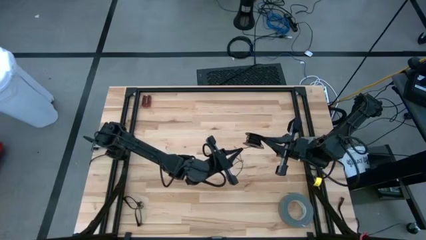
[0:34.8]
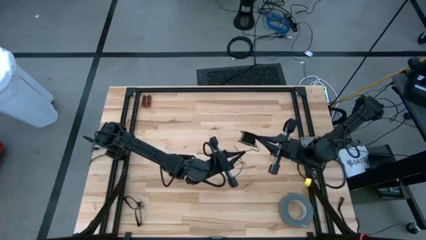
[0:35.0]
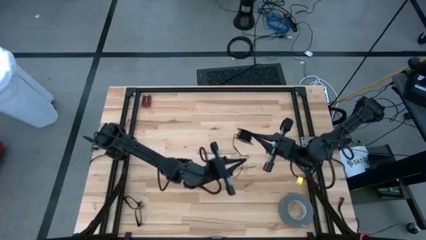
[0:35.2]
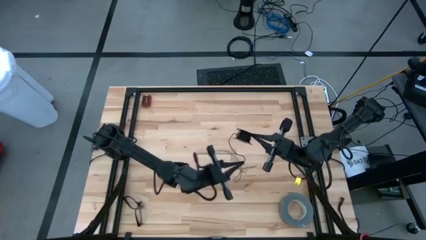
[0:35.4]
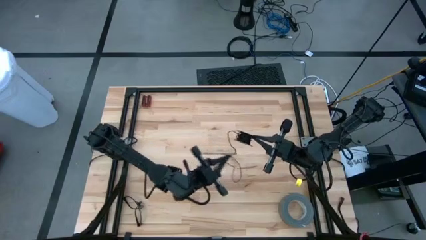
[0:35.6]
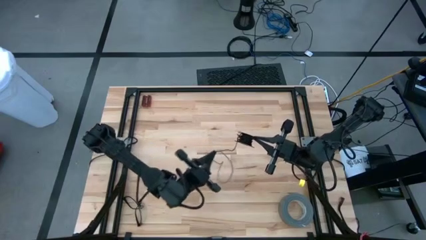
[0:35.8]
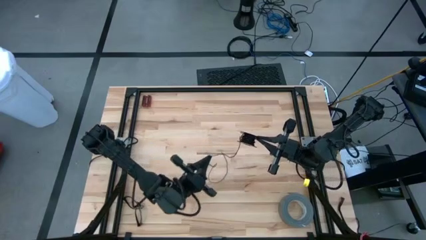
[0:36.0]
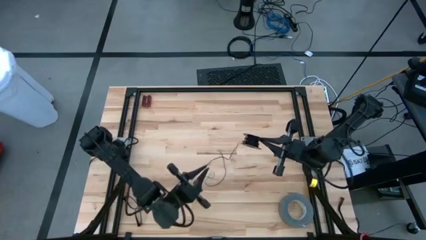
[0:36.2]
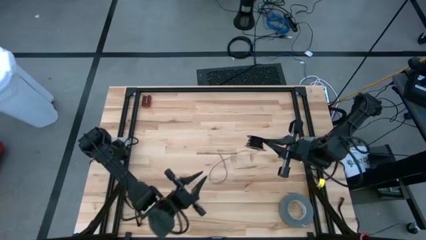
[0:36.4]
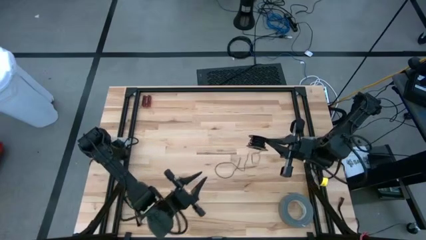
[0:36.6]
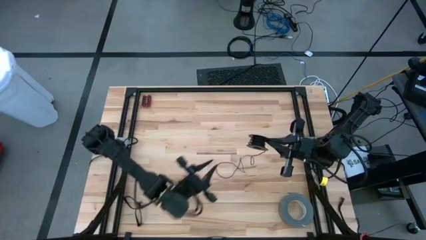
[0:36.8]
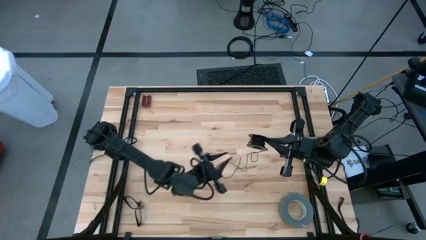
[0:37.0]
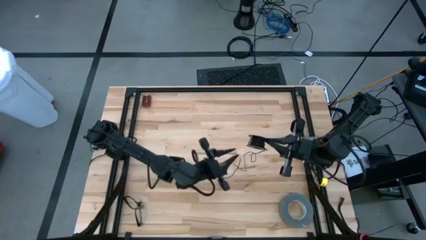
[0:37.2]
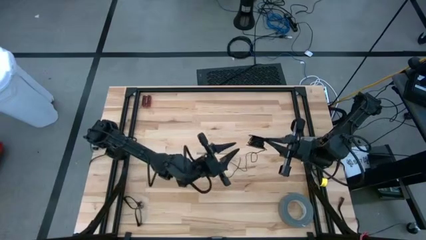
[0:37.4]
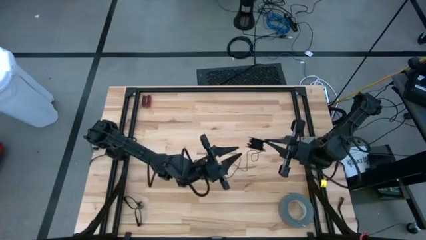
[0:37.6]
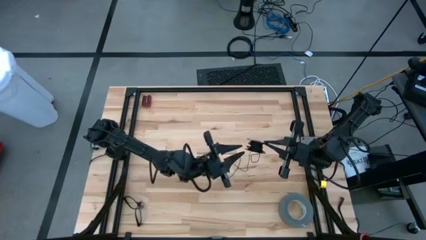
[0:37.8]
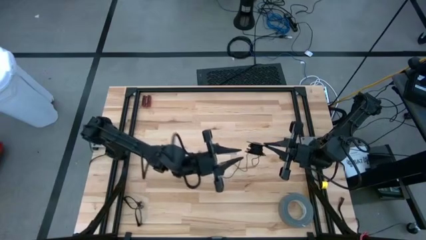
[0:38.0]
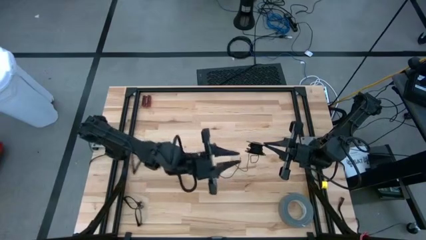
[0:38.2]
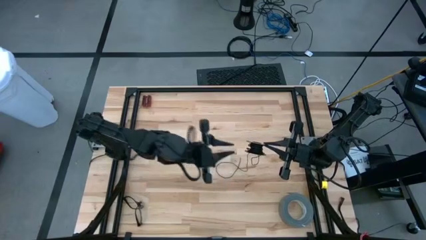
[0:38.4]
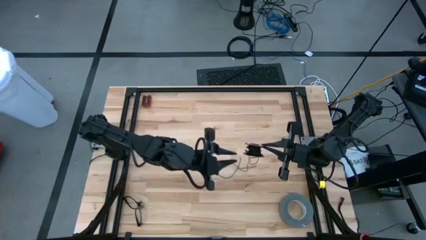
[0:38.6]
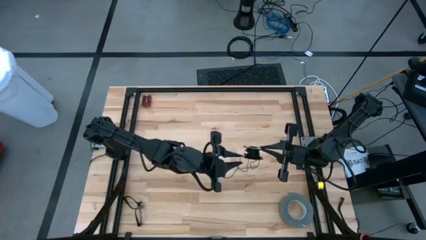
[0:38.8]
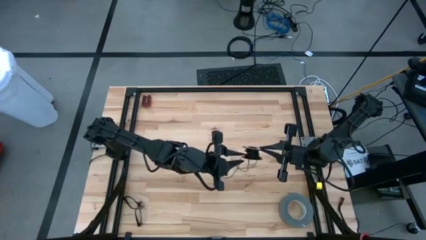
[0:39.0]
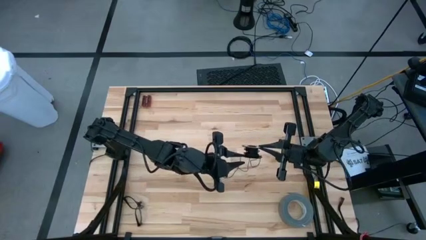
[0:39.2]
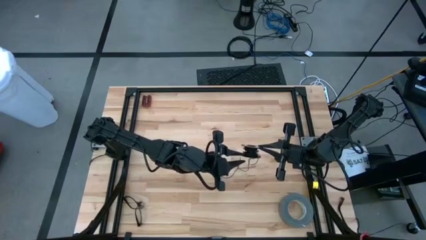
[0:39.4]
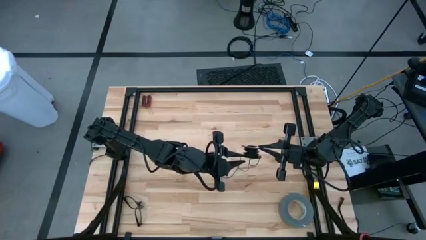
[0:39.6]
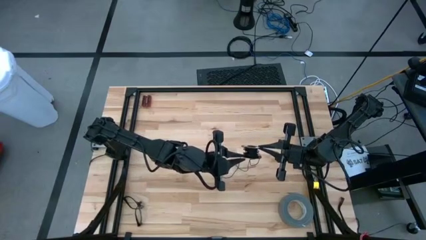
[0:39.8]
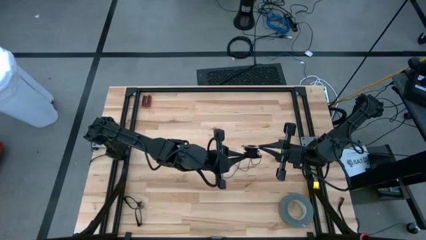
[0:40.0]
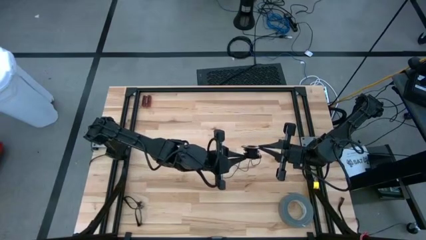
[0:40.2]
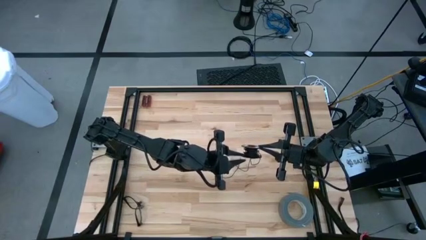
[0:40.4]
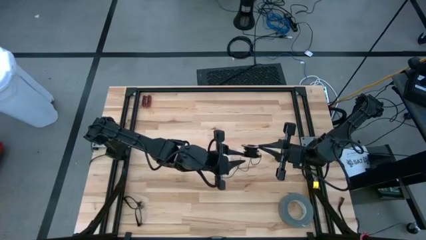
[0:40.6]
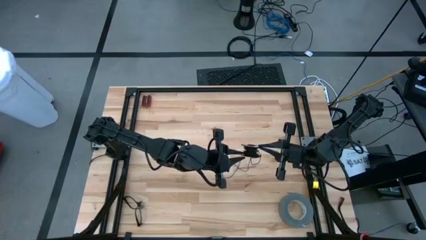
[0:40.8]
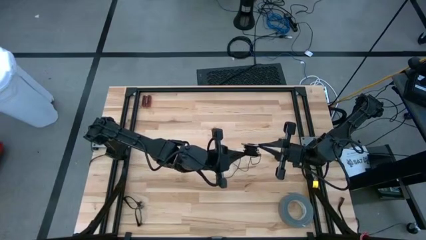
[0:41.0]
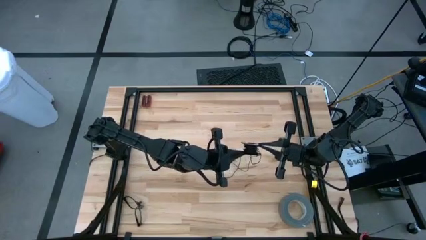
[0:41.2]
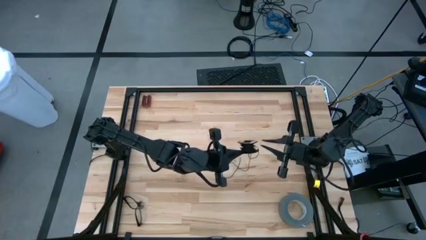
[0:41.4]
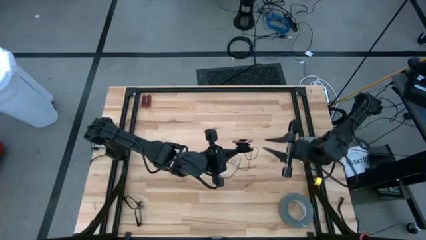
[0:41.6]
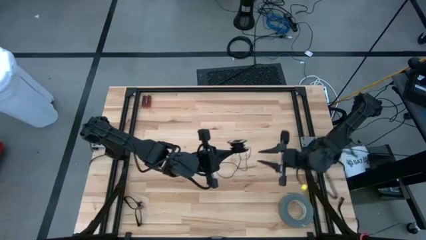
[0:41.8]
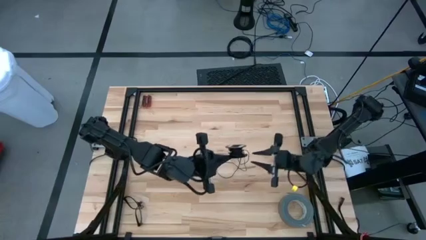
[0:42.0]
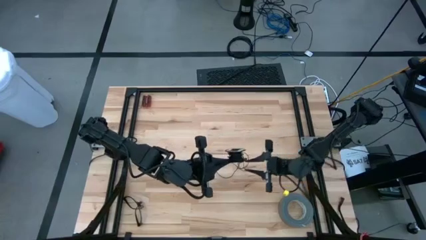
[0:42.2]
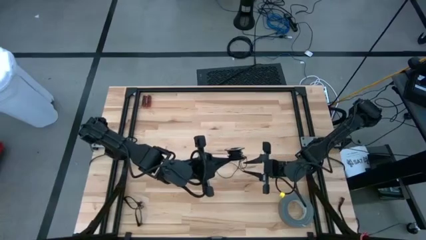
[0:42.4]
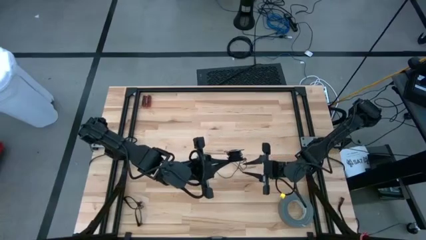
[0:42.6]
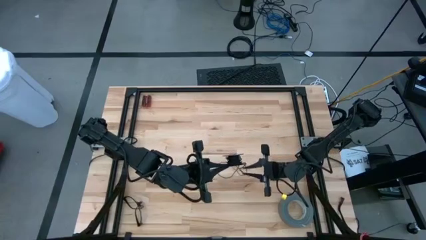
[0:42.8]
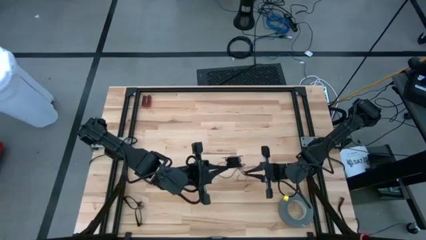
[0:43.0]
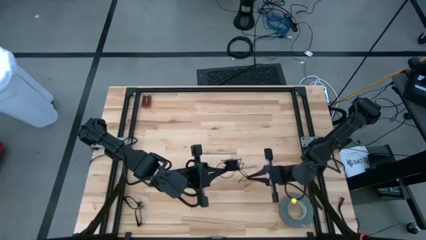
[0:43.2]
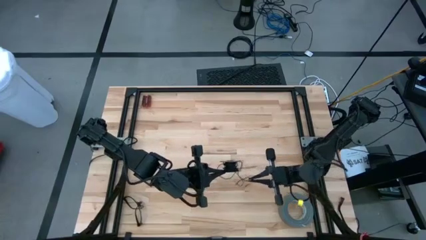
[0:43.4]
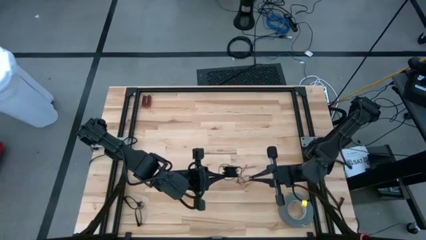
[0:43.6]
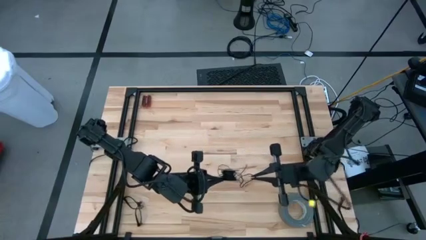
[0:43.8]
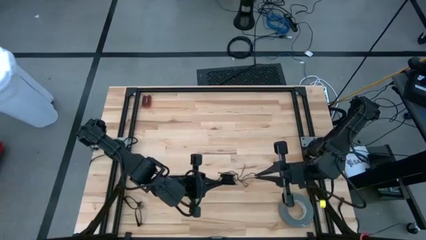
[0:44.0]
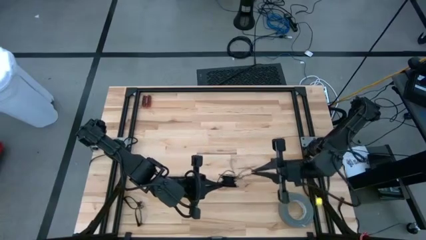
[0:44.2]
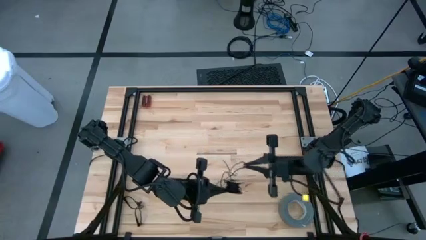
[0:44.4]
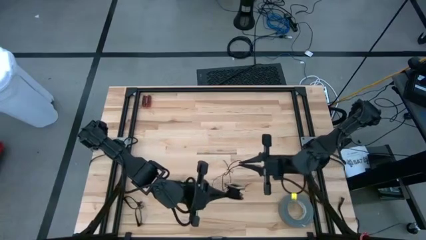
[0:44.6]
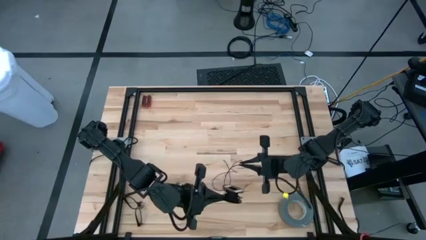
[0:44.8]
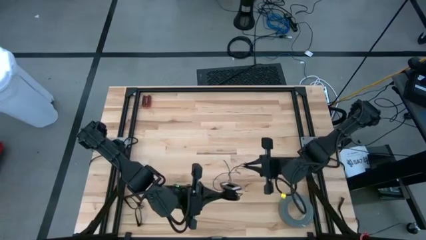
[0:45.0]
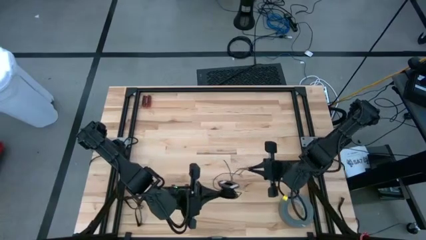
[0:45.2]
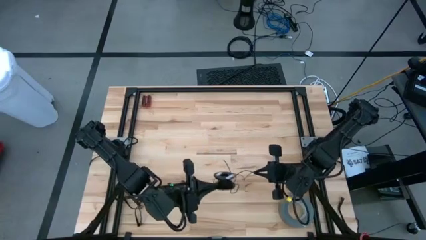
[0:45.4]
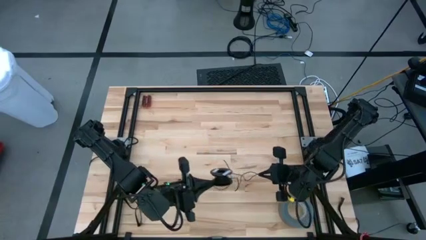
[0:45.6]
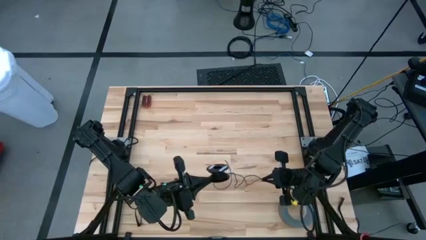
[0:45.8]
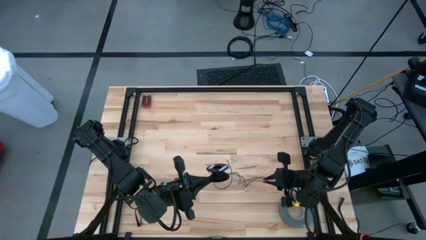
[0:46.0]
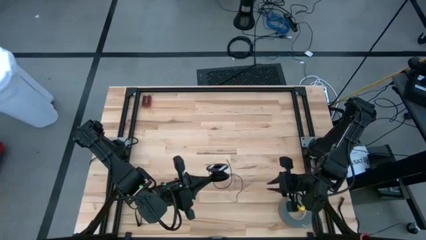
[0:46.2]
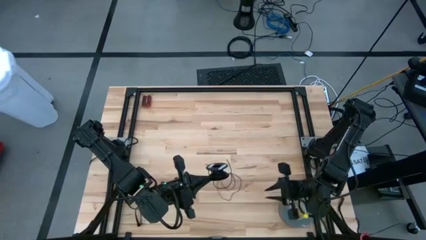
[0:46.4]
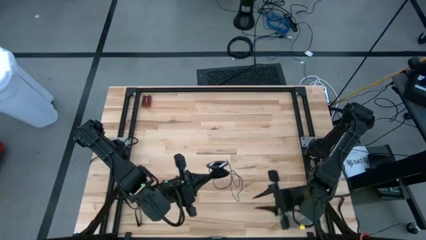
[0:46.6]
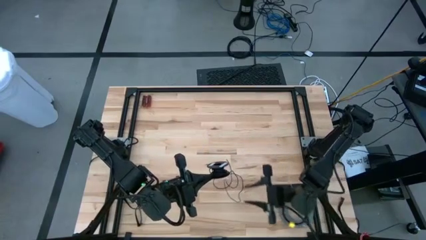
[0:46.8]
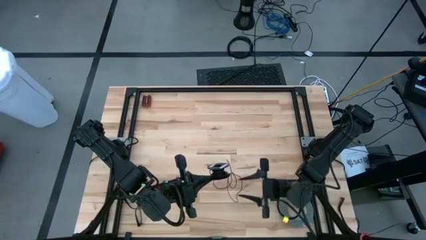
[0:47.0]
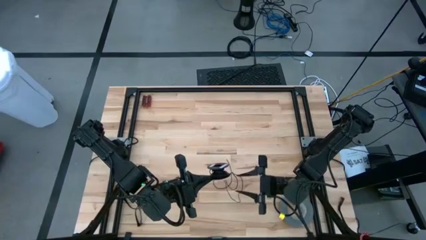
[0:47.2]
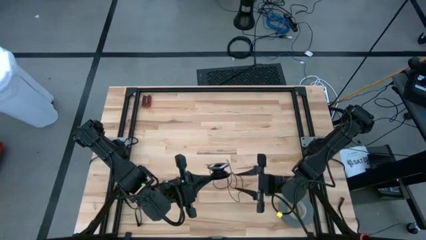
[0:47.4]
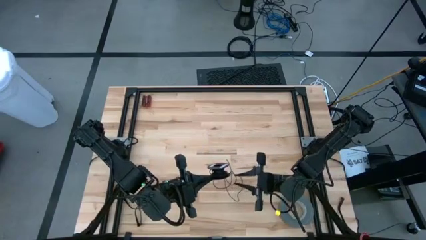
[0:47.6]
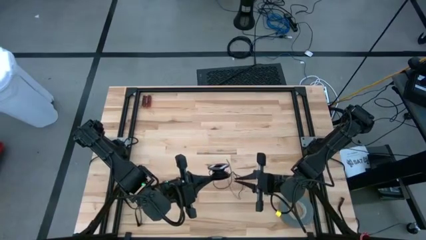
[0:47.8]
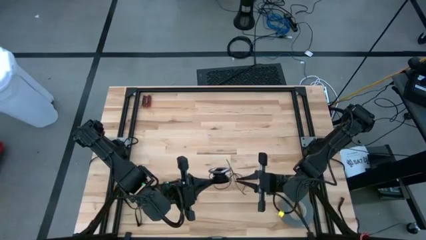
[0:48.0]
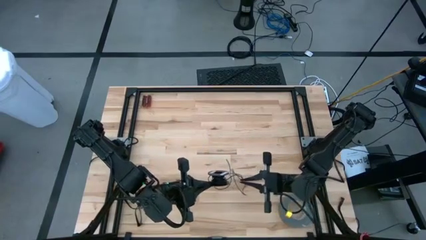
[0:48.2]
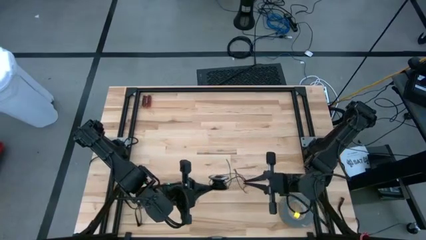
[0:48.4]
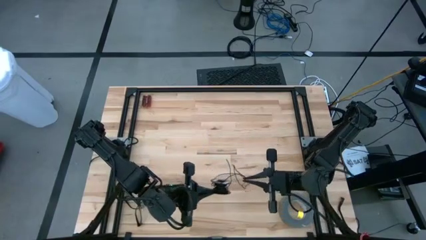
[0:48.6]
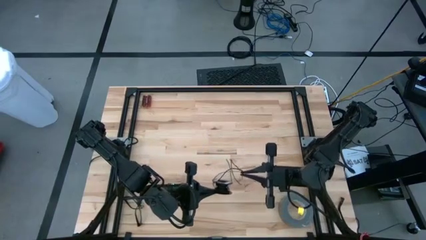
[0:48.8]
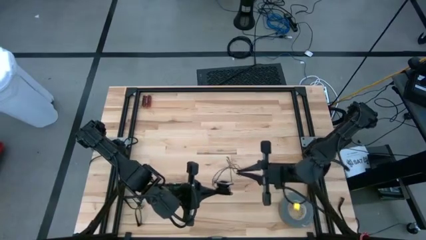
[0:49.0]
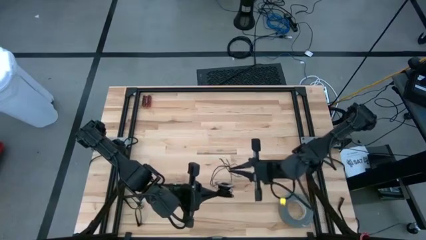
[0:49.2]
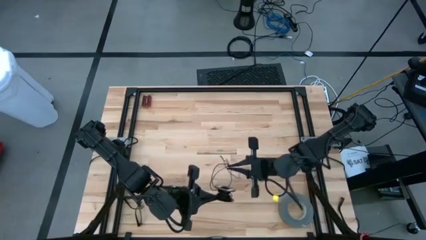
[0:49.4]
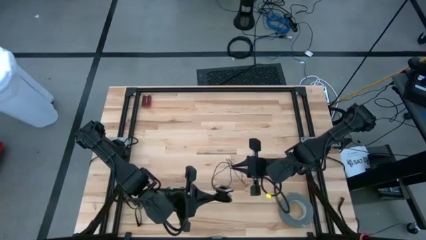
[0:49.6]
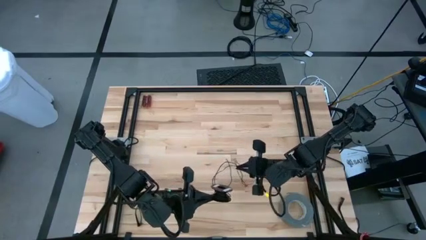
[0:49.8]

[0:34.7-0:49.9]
Task: Coil cords
Uncoil the black wire from the spool
